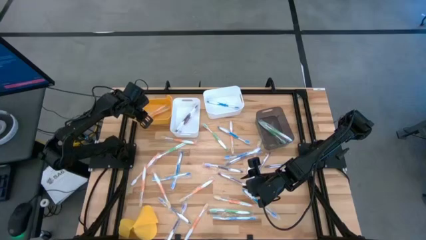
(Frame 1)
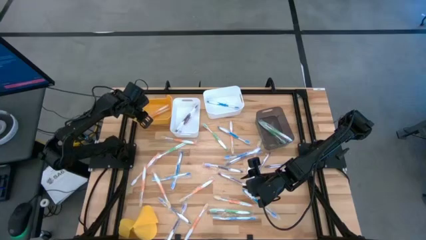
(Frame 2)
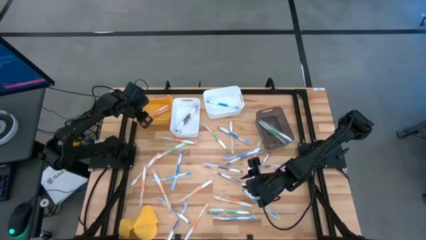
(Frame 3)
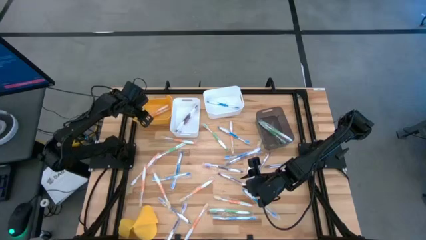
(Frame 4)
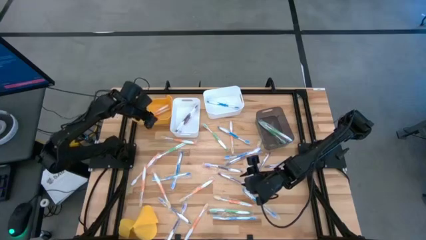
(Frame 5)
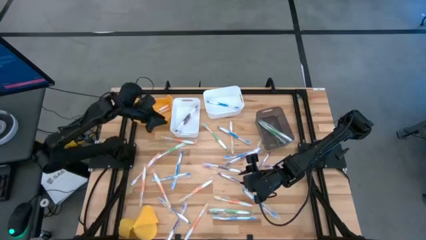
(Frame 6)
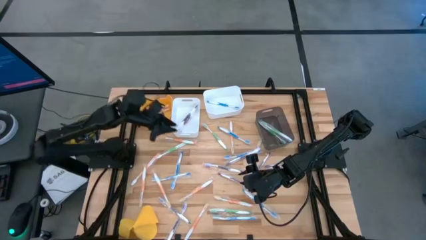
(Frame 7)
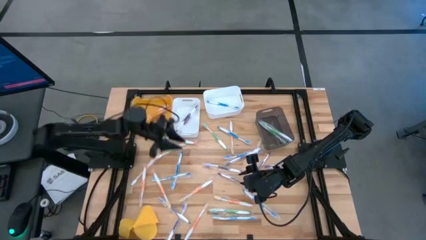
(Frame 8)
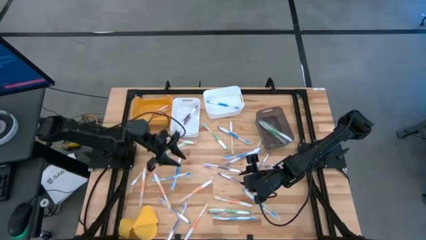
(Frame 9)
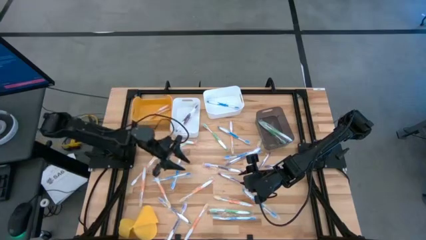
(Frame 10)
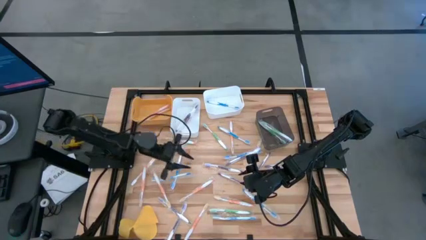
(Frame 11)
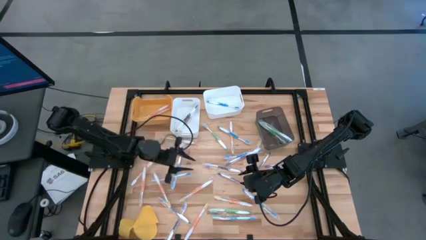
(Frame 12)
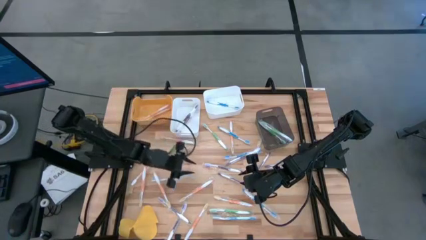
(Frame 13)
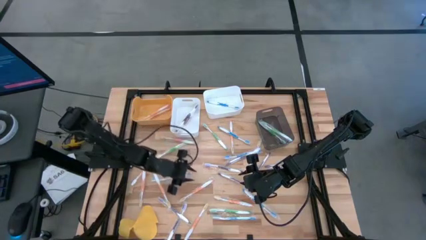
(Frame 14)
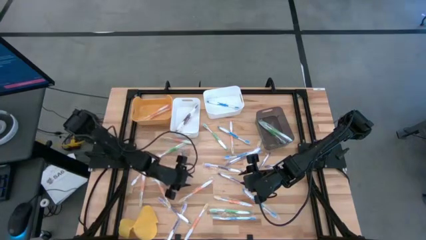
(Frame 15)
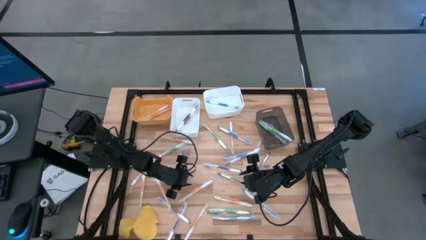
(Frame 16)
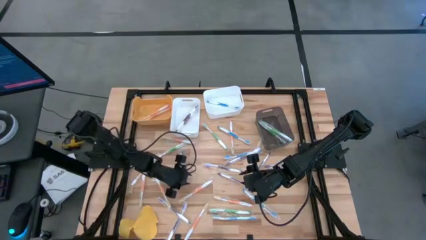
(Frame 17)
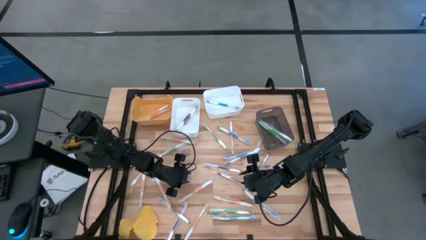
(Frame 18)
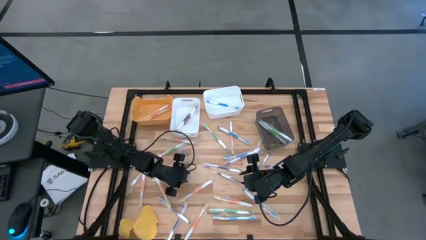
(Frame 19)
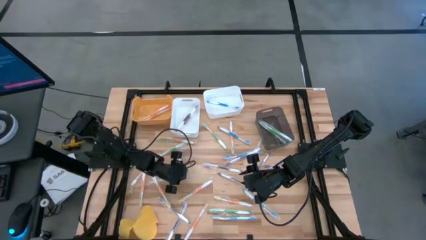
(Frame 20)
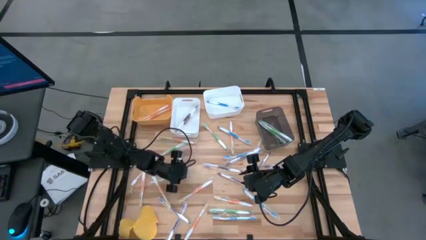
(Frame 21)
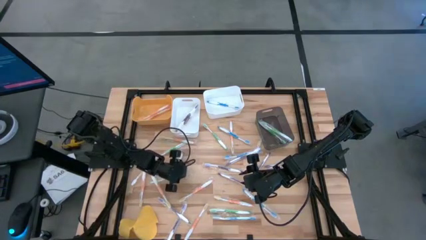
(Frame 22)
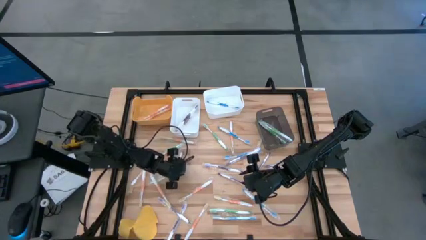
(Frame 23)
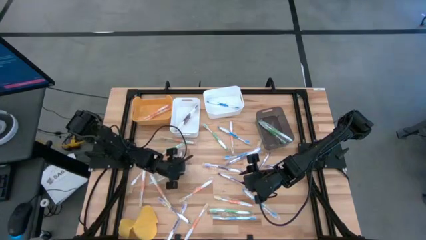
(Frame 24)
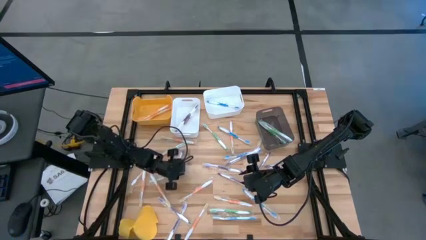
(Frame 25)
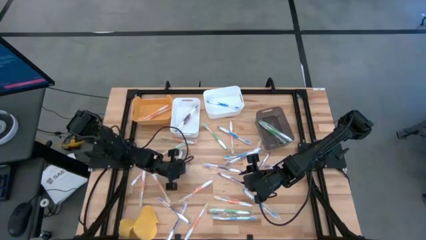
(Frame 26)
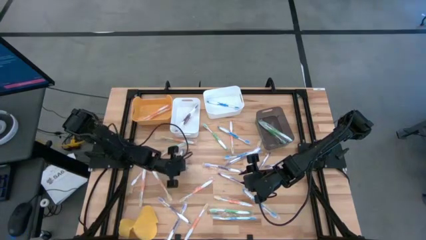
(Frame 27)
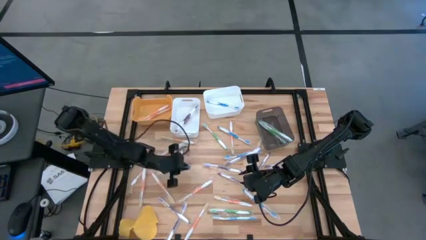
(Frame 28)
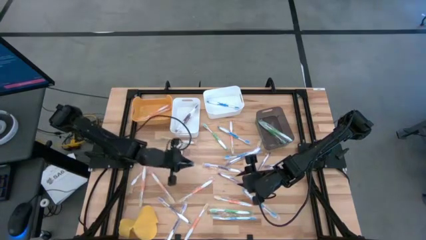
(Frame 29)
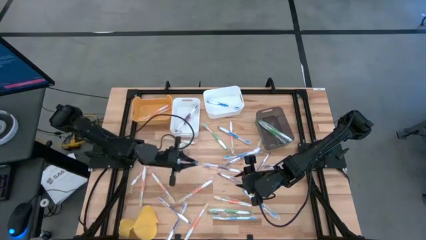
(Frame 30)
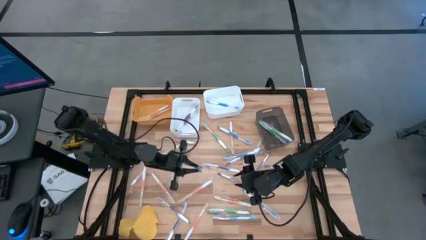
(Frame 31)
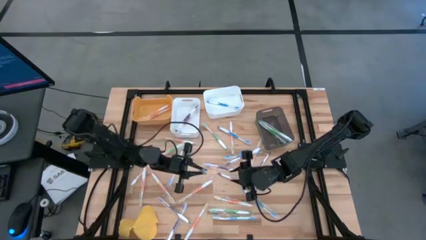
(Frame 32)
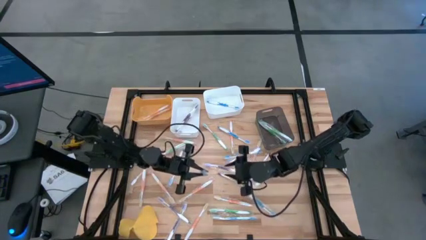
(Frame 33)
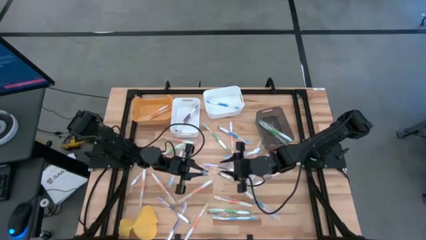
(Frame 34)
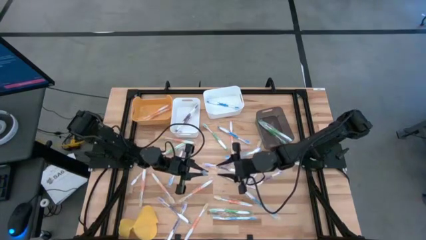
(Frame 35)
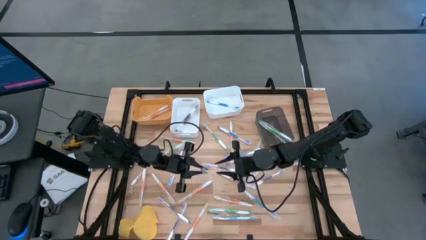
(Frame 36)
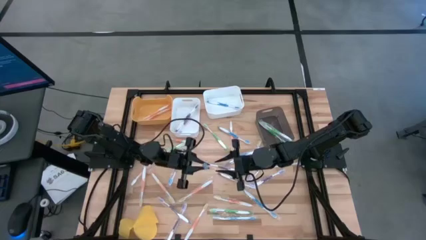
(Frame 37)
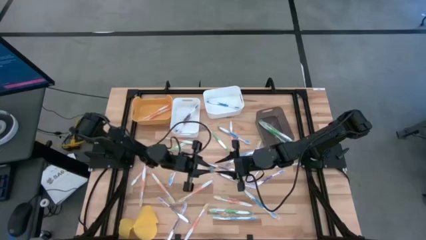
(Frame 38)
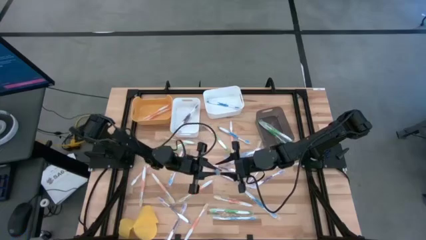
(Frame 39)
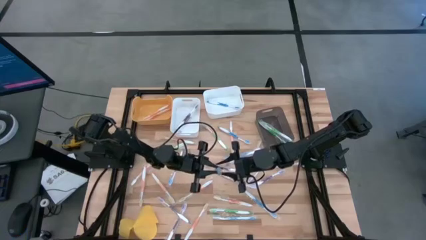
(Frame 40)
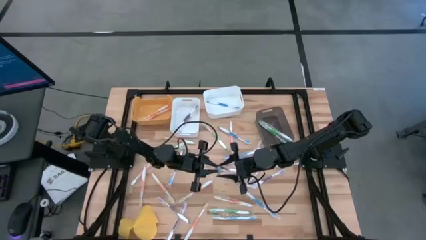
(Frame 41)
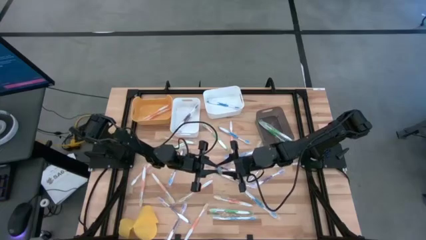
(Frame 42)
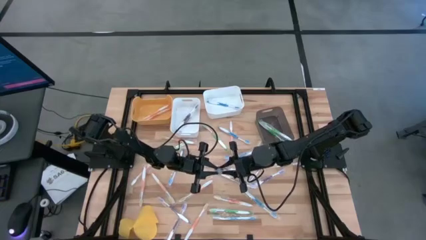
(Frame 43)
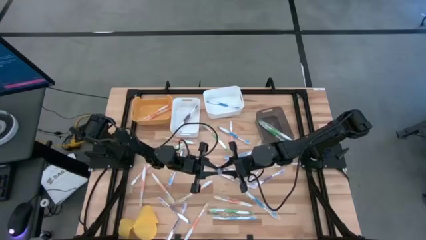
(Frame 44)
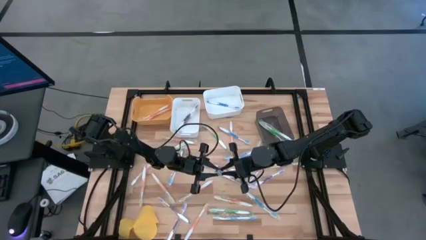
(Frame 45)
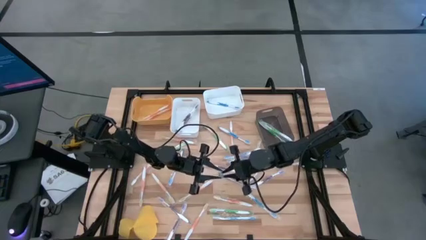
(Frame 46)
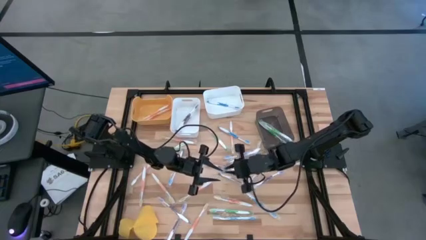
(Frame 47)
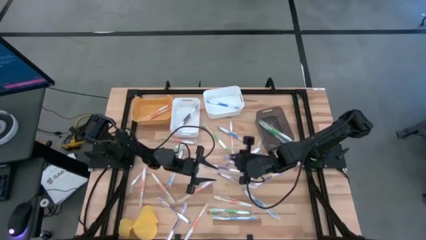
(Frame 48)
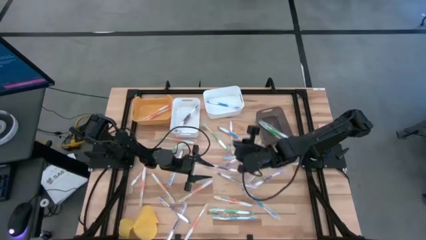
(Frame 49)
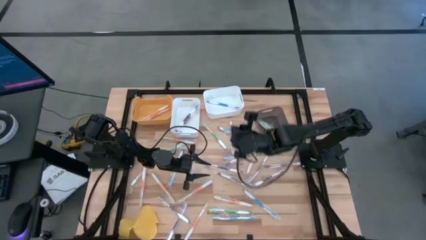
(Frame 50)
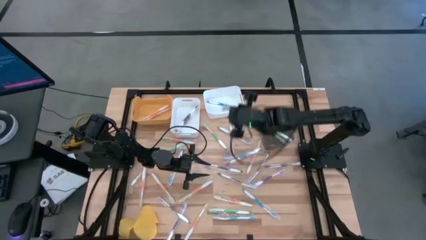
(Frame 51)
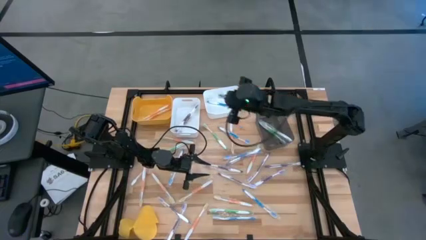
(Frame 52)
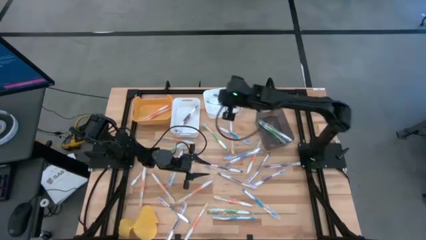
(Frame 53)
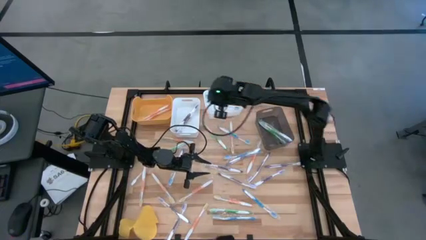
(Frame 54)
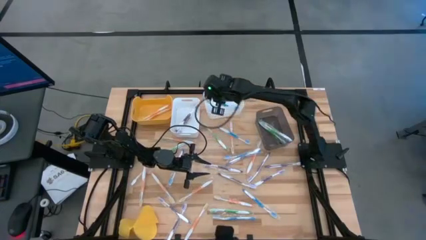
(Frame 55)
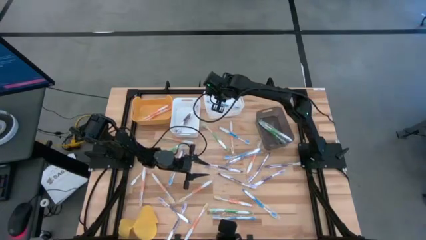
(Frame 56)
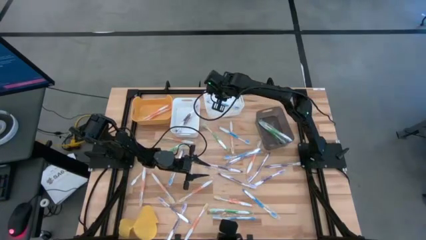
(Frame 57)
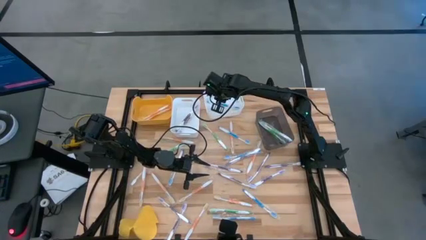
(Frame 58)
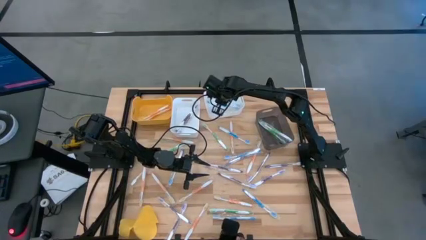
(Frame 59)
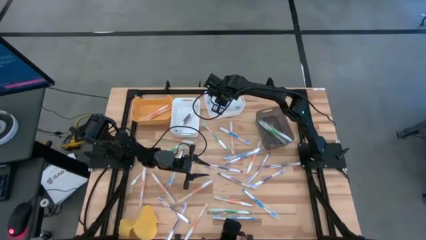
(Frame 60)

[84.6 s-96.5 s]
Task: Pick & Place Toothbrushes
Put the blue toothbrush into the right white bin

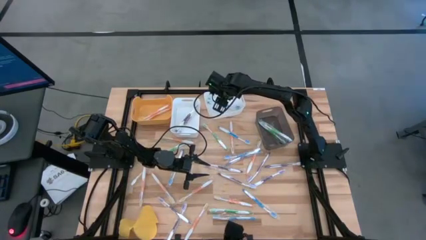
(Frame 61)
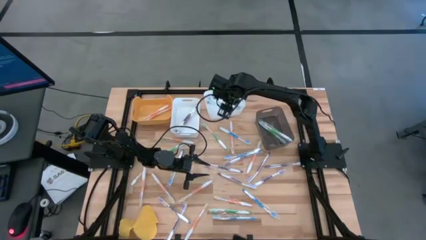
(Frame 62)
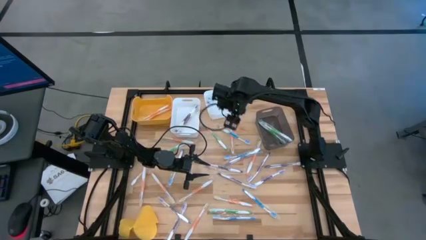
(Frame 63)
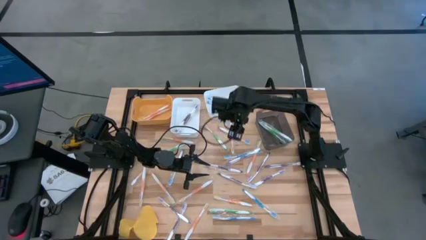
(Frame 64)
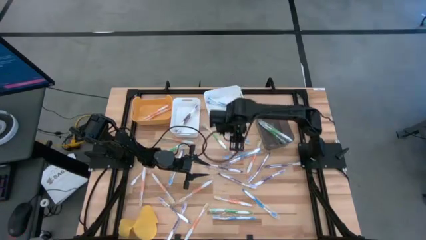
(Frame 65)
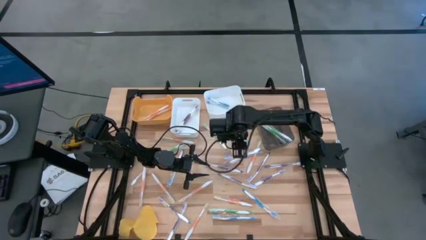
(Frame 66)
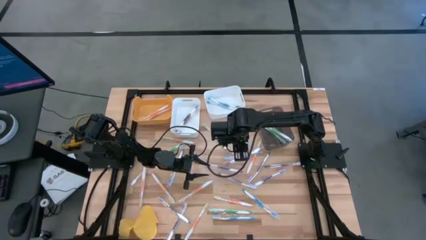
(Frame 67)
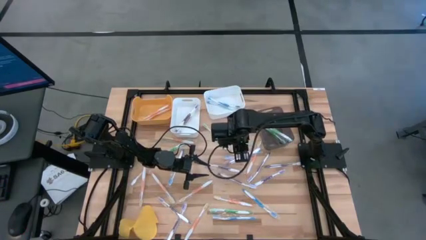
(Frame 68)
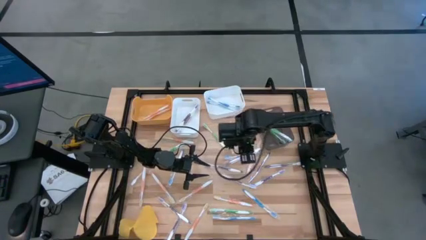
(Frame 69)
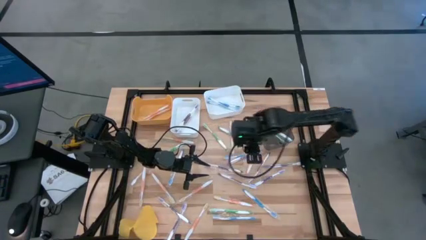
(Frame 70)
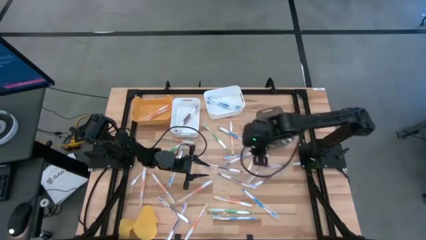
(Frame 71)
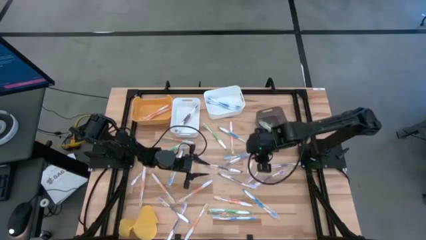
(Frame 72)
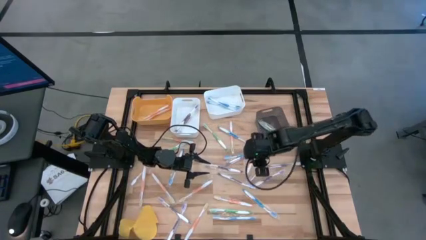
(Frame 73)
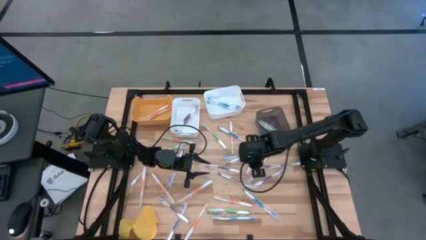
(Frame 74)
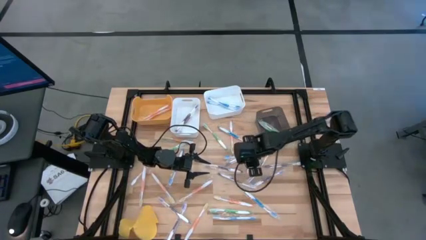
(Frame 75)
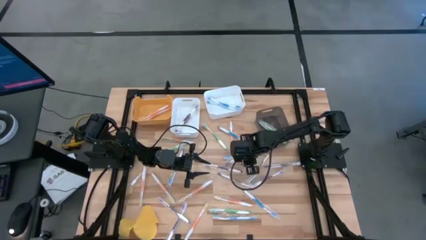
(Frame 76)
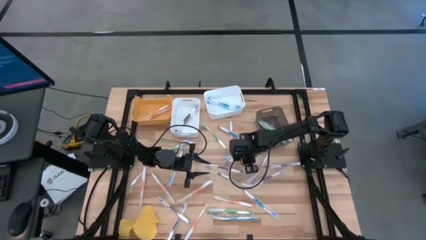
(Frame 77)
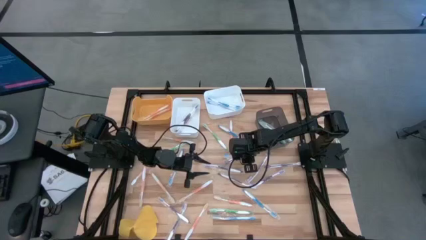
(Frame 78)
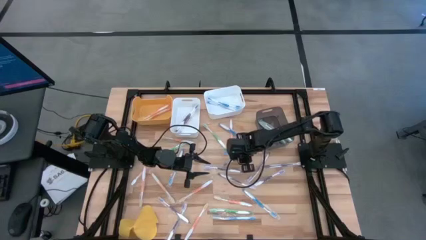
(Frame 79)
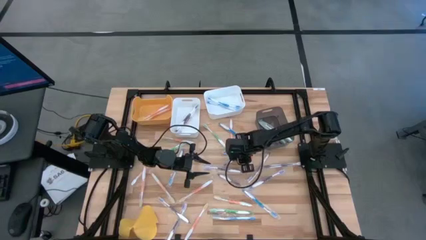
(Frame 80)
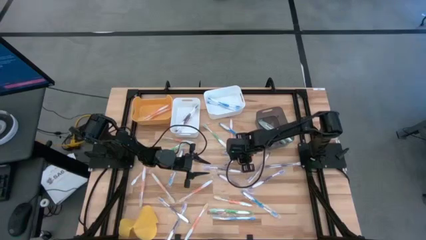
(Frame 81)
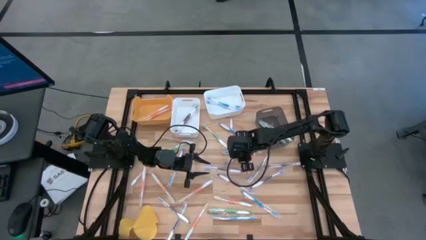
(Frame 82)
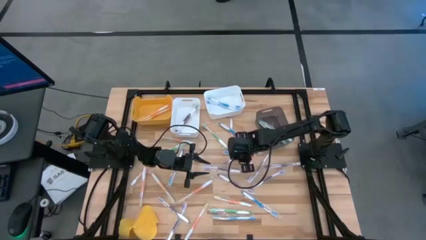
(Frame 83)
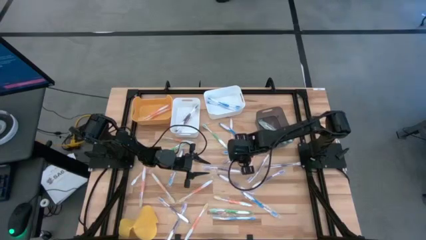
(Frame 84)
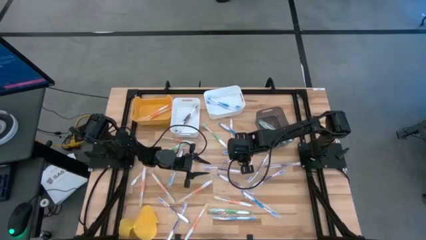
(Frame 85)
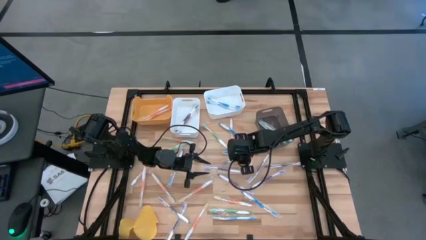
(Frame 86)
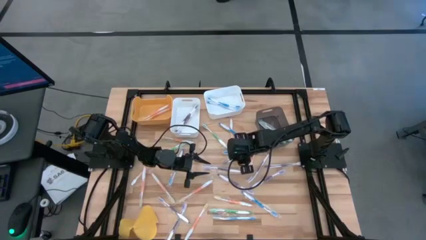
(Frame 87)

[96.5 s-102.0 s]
Put the purple toothbrush into the left white bin
